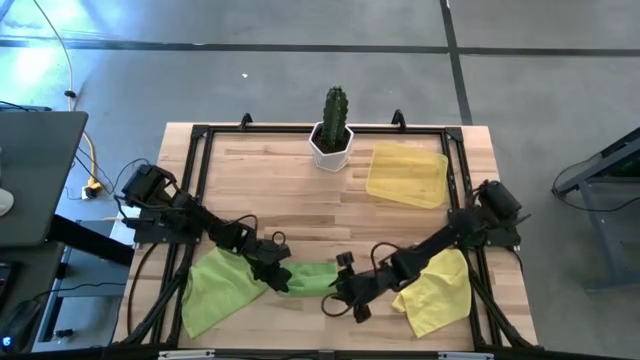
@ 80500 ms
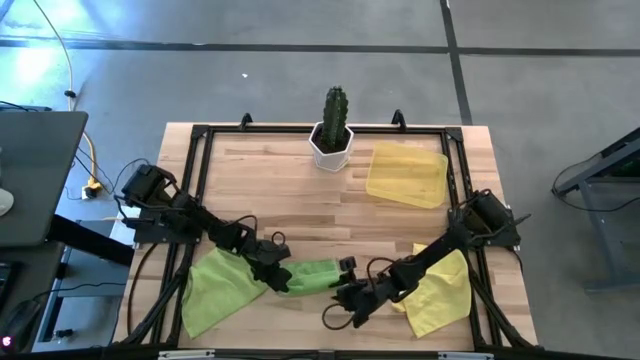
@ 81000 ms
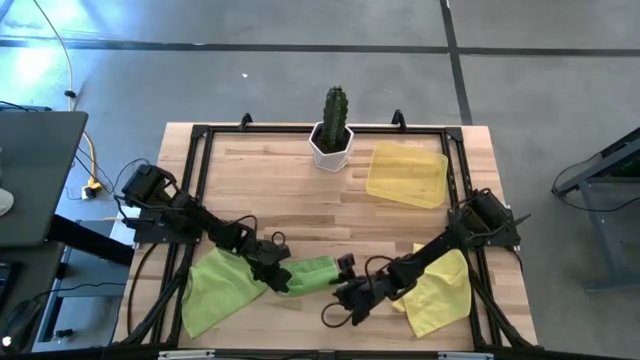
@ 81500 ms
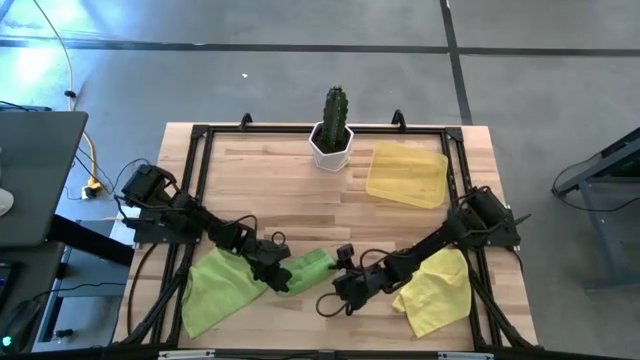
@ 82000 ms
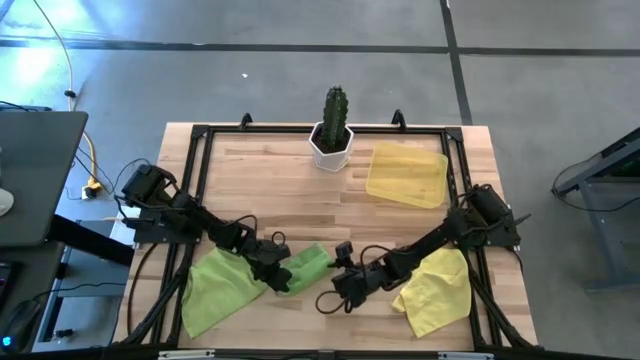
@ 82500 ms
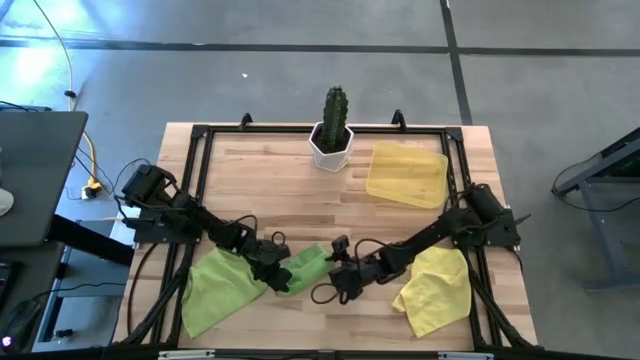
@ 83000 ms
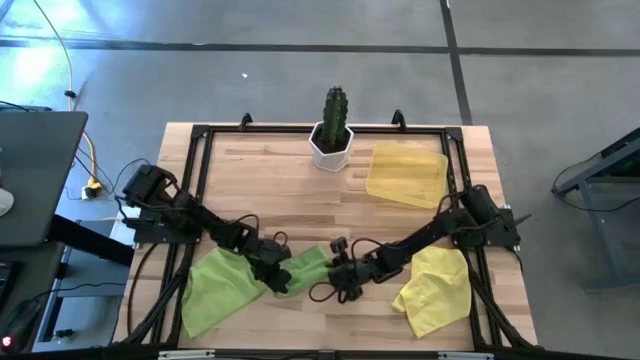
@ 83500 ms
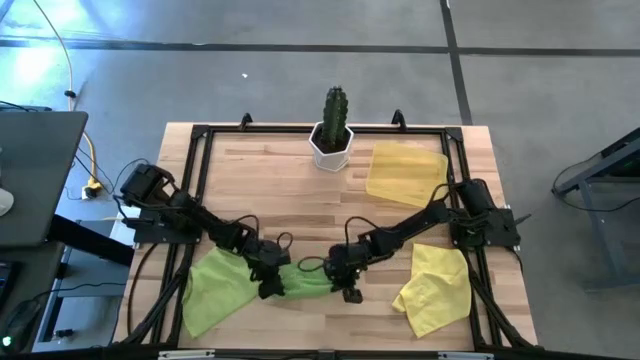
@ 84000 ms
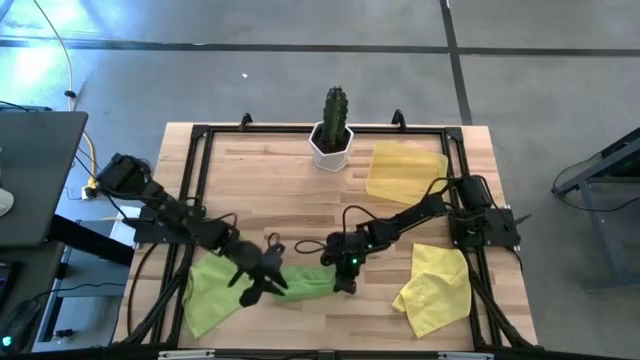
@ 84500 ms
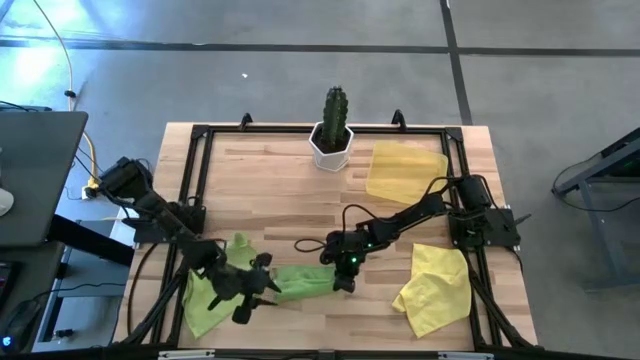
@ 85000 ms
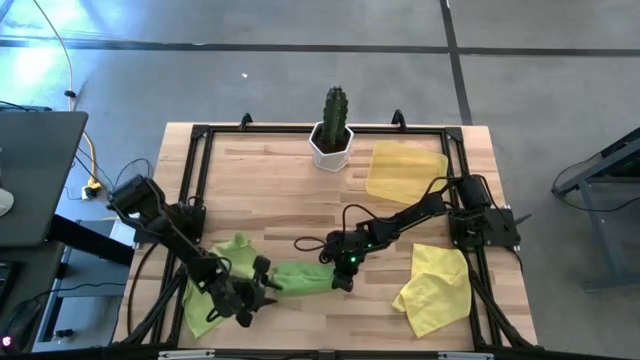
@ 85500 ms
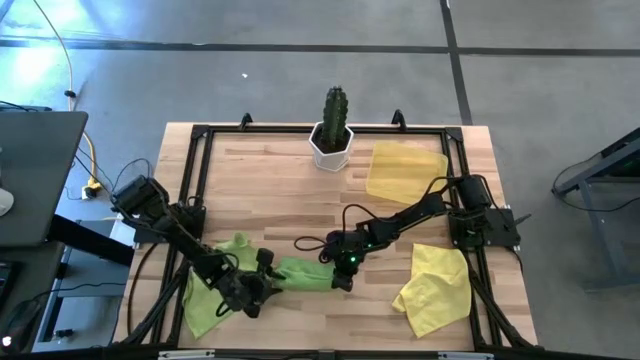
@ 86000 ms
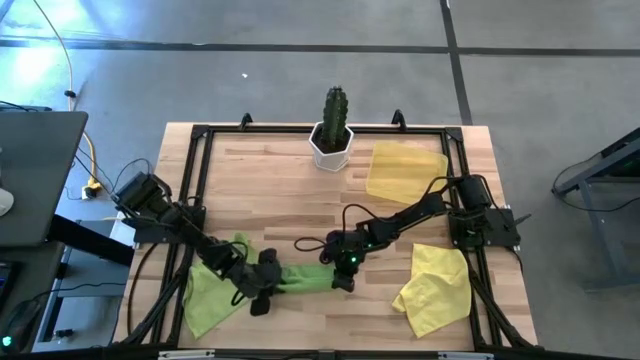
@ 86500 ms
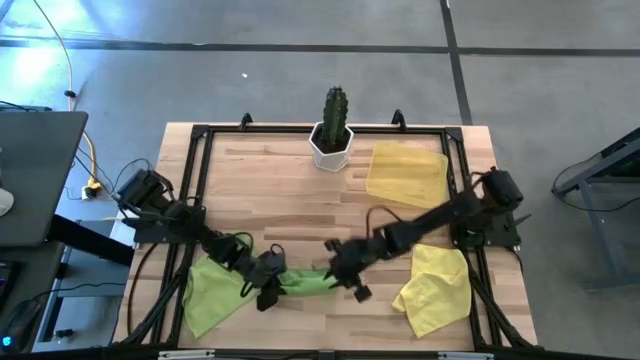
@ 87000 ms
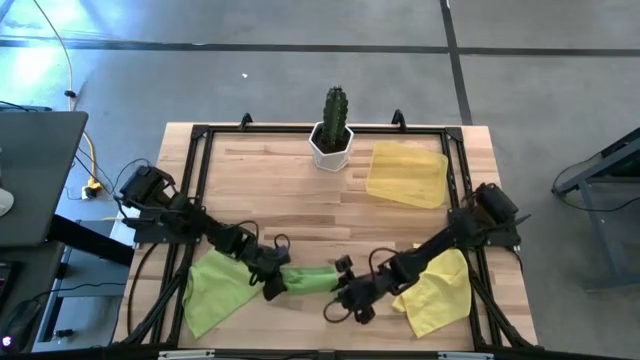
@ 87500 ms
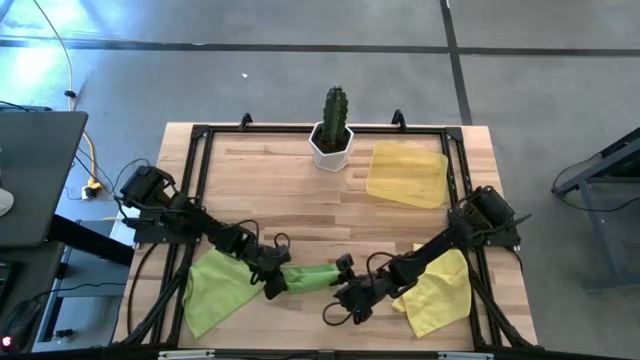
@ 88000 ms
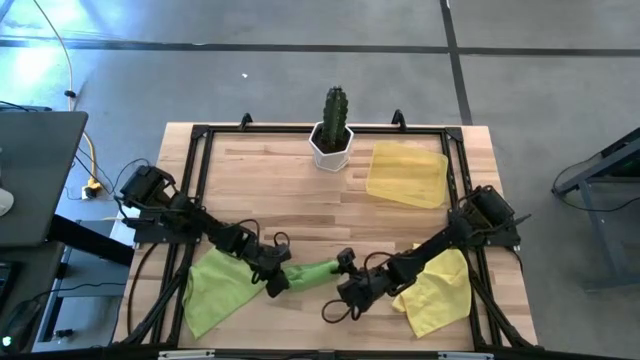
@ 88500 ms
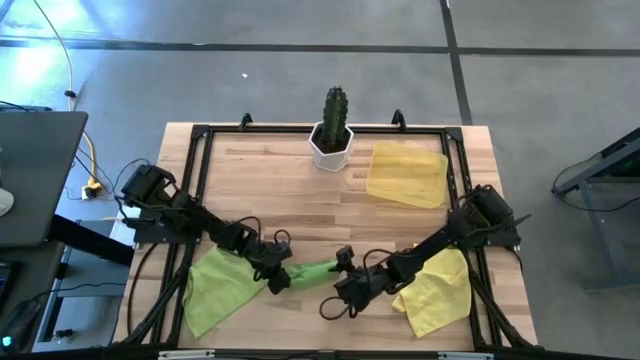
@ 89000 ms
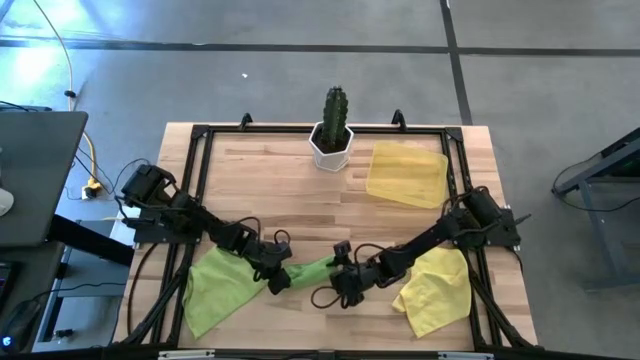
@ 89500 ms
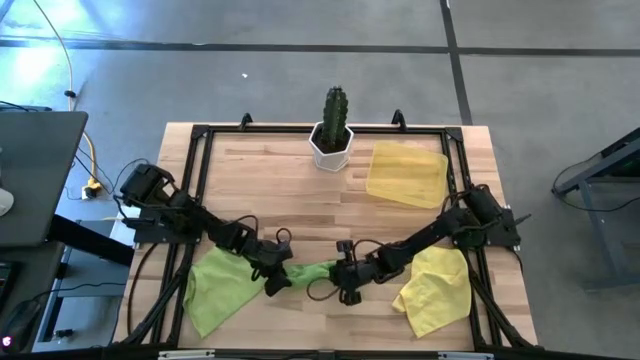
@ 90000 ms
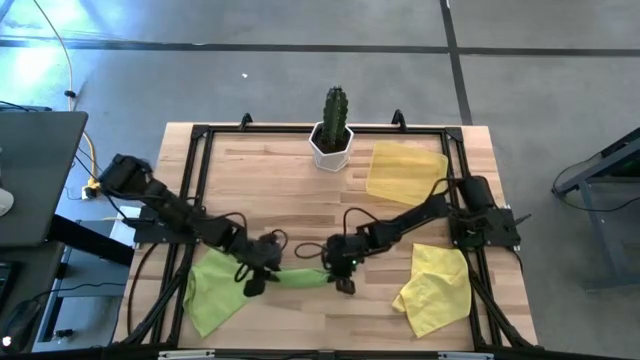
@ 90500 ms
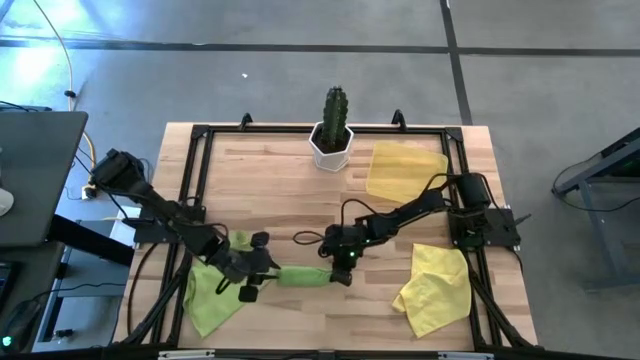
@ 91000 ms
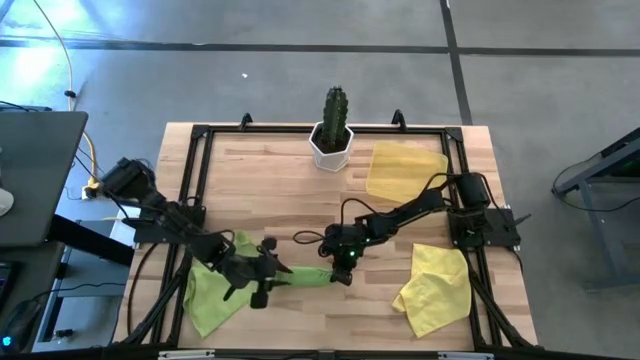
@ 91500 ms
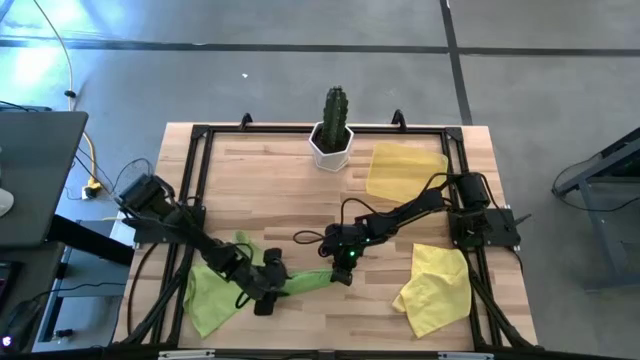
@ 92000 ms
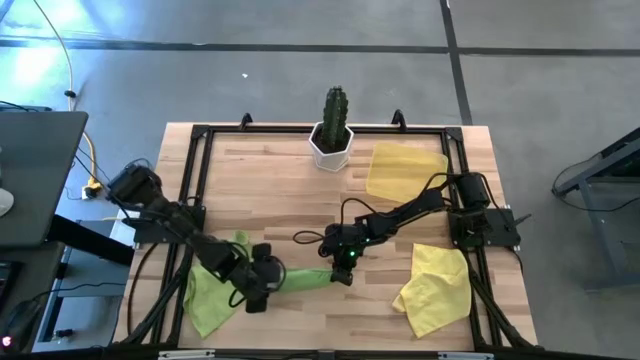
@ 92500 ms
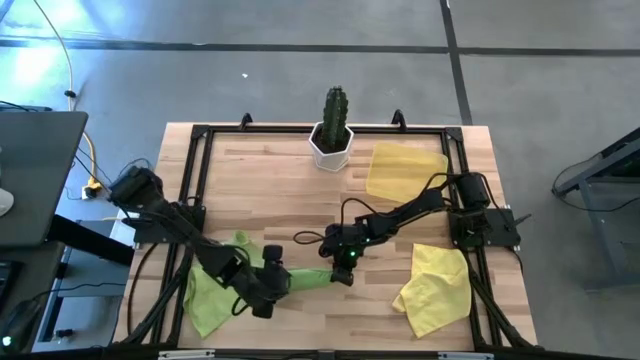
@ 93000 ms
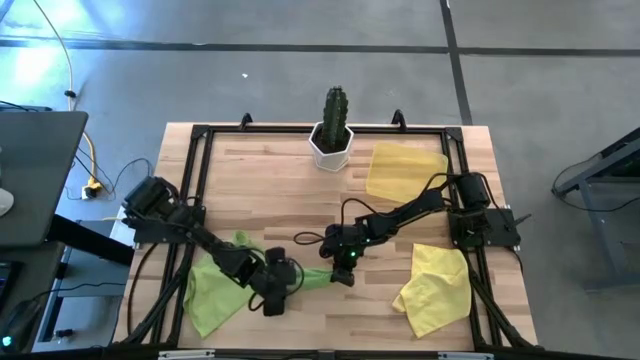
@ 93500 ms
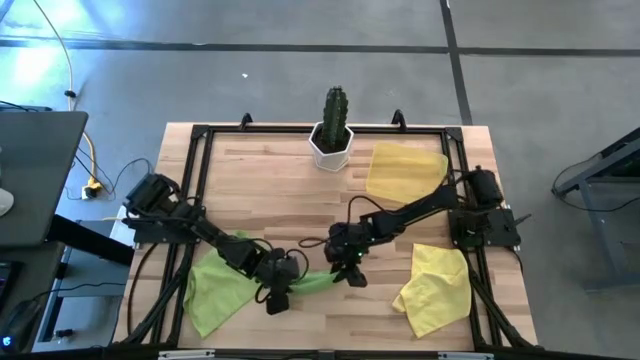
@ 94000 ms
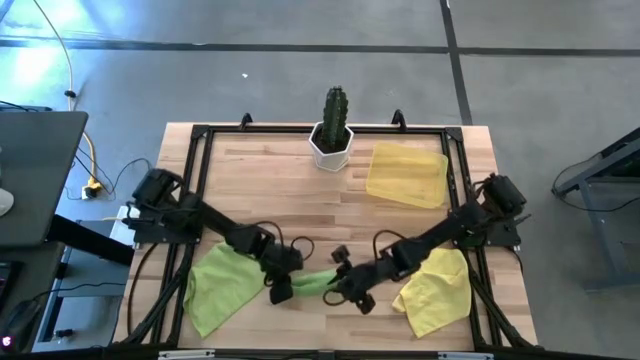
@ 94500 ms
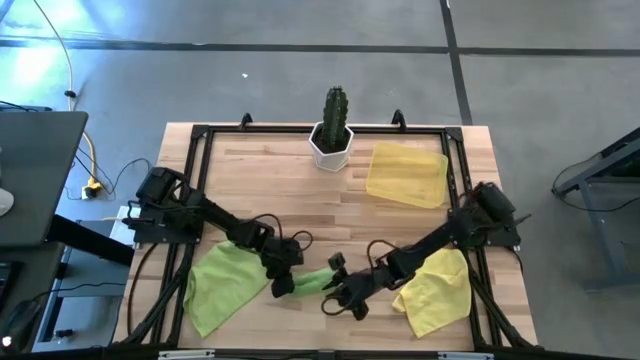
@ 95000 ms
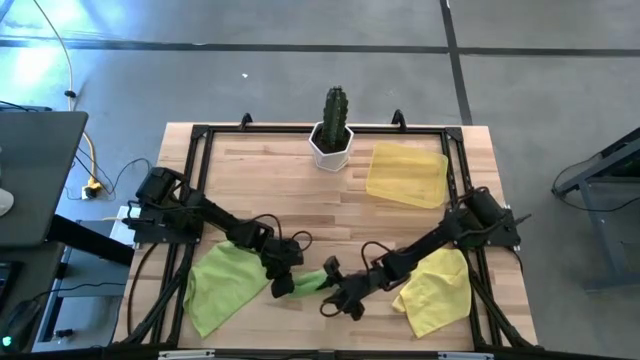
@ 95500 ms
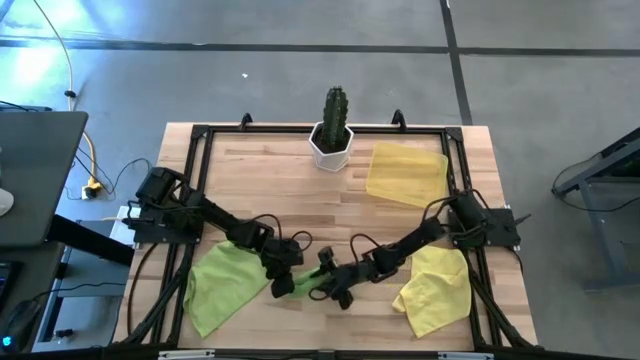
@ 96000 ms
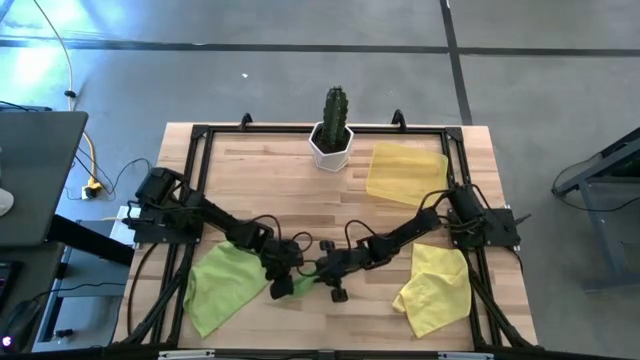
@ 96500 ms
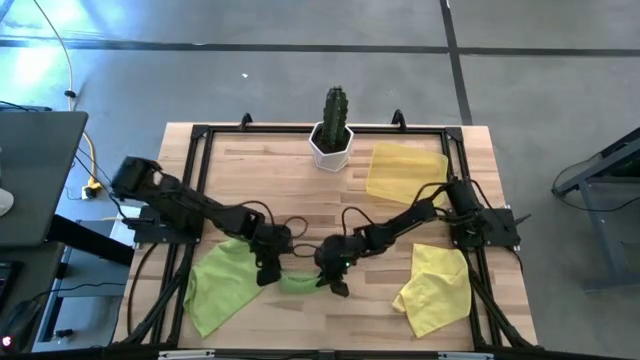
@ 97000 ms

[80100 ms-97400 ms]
Task: Roll microfiber towels into tight, uniform cylinder then place into a basket
Roll the green towel

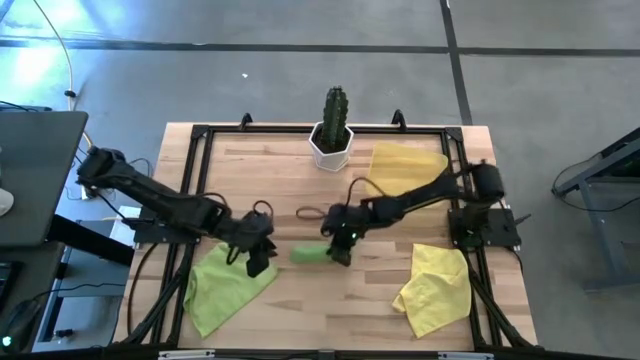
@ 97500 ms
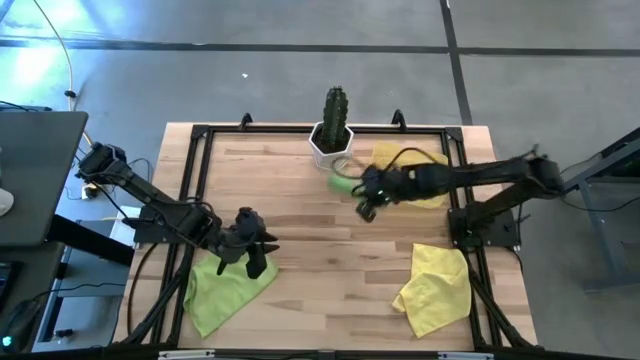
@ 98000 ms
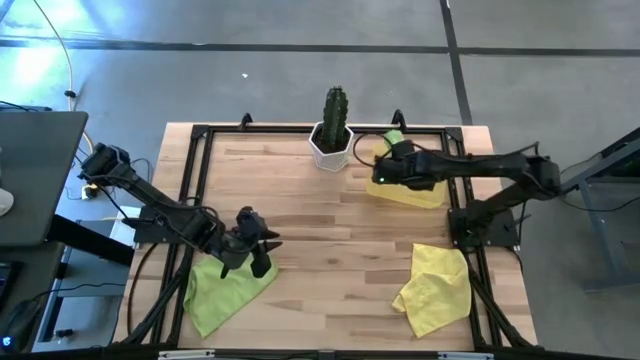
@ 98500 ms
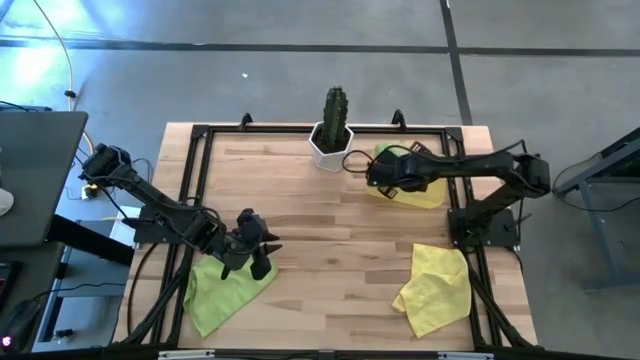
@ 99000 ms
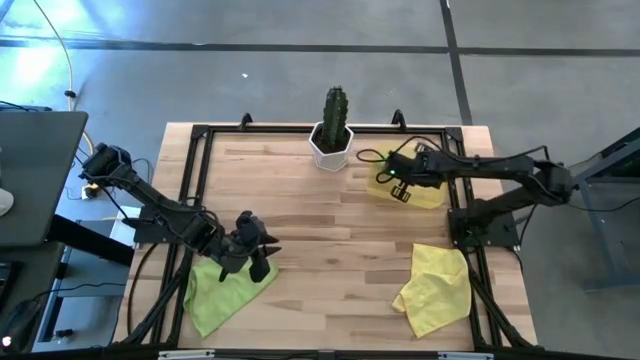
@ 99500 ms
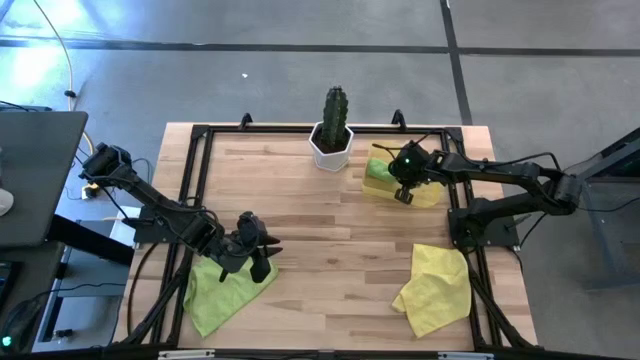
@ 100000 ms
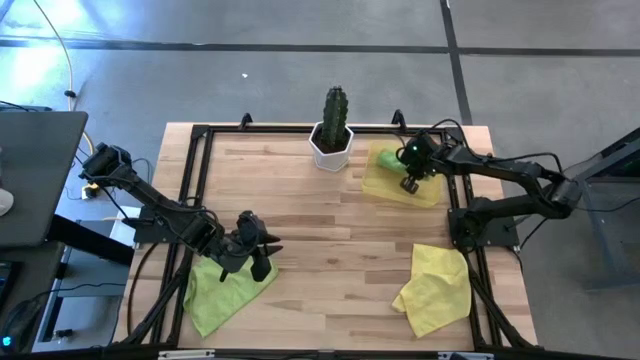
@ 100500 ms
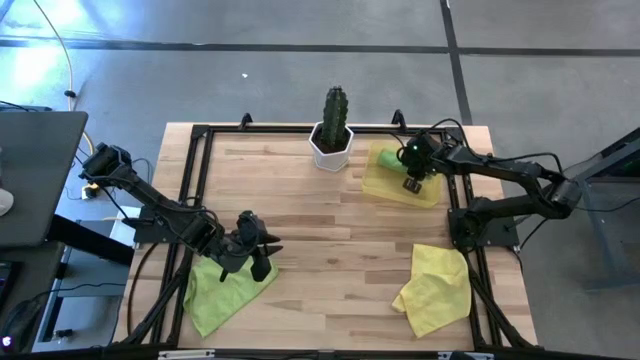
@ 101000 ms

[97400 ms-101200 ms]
Put the green towel into the yellow bin
